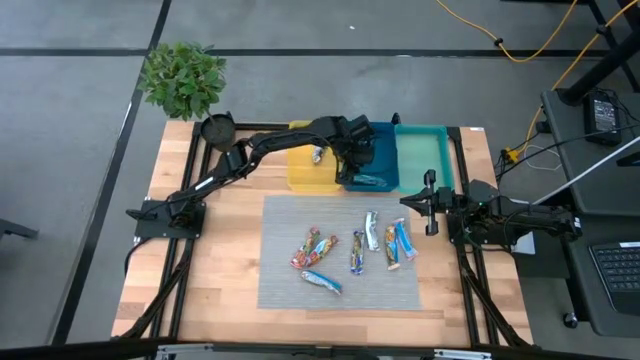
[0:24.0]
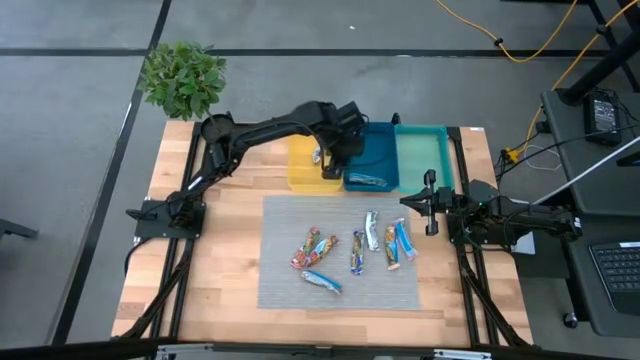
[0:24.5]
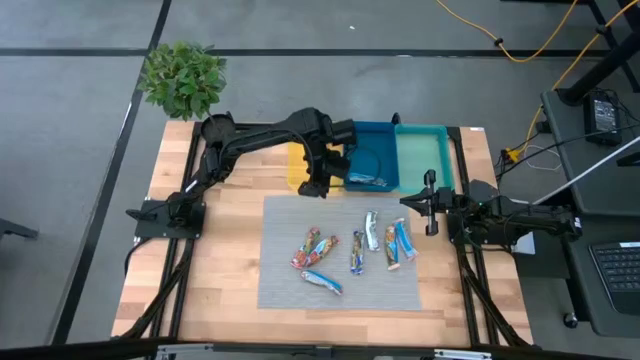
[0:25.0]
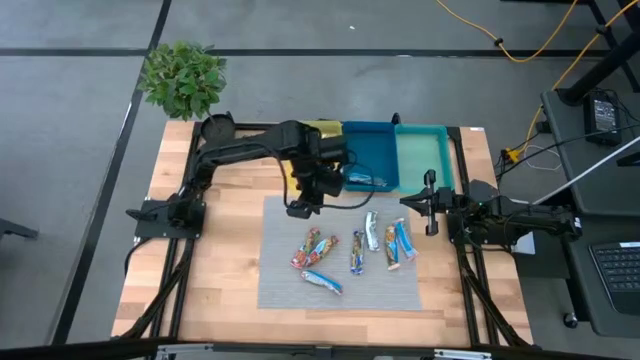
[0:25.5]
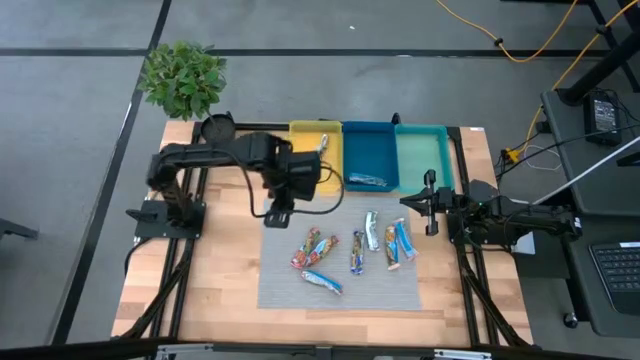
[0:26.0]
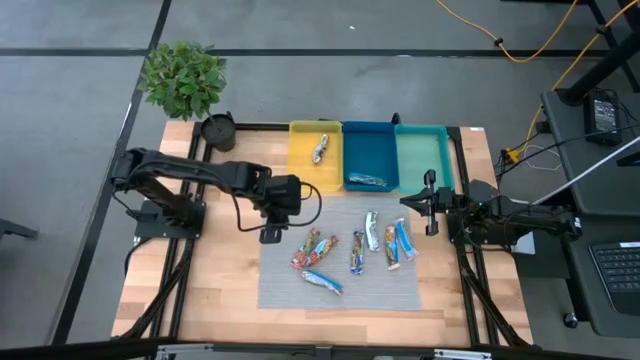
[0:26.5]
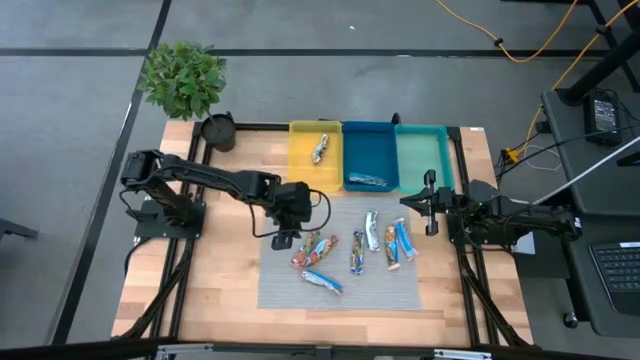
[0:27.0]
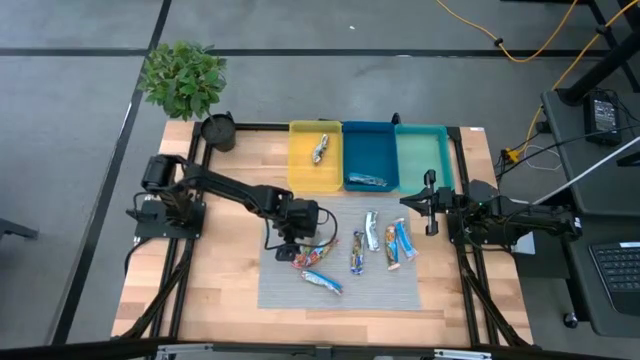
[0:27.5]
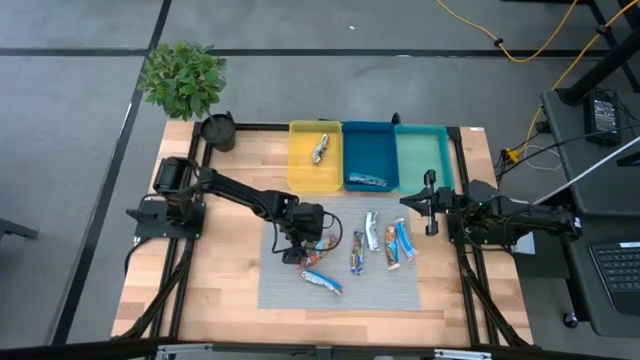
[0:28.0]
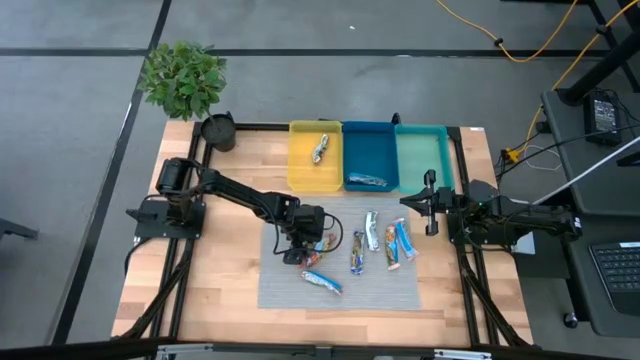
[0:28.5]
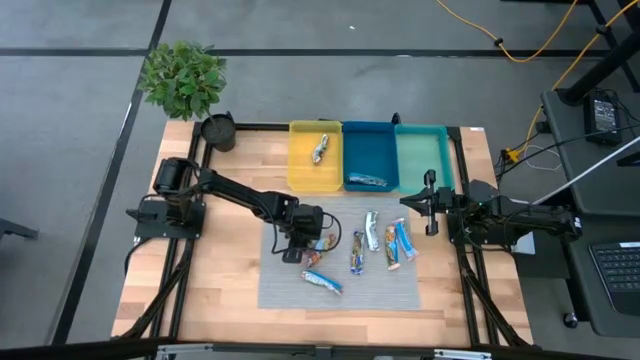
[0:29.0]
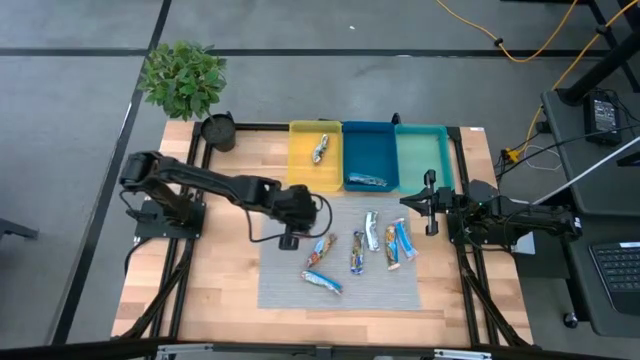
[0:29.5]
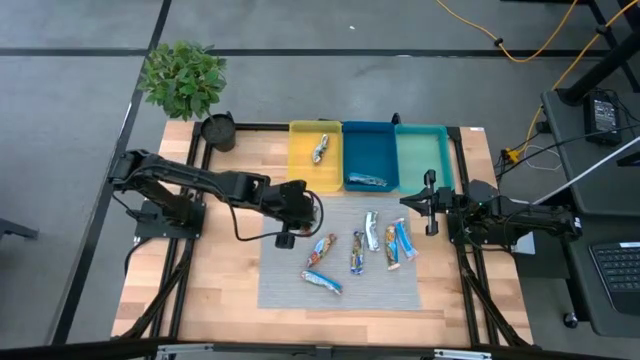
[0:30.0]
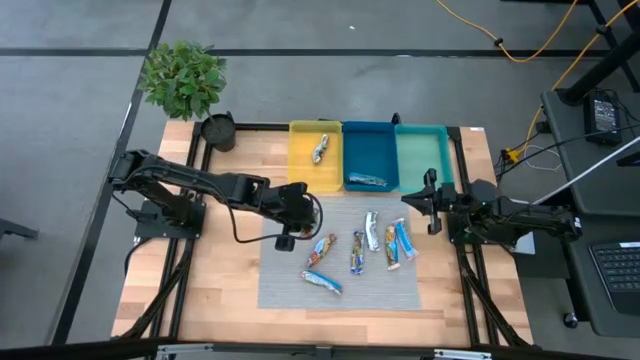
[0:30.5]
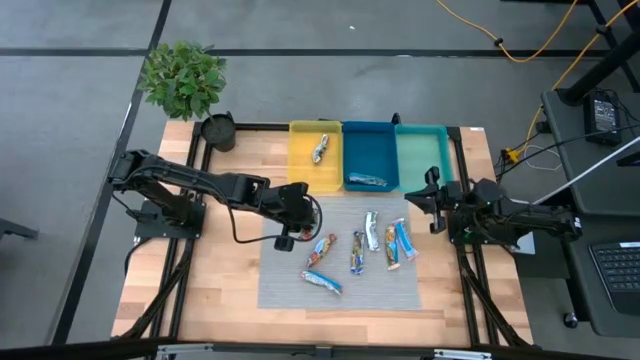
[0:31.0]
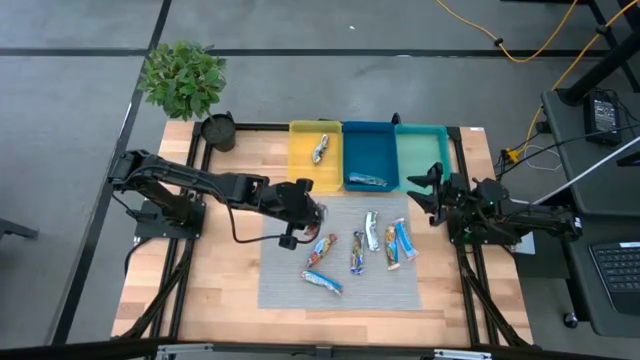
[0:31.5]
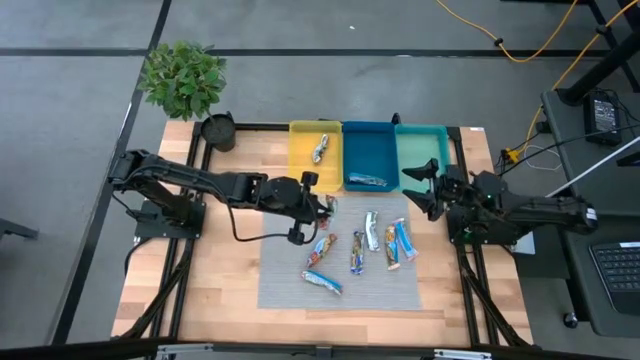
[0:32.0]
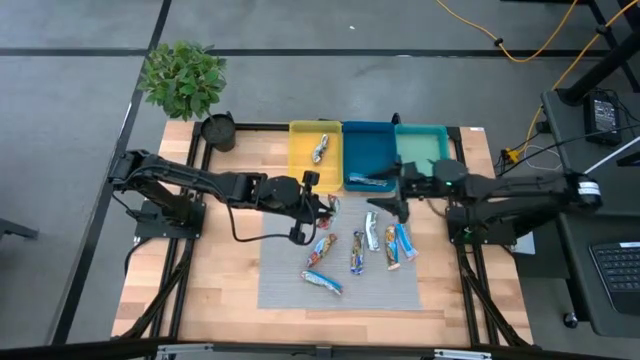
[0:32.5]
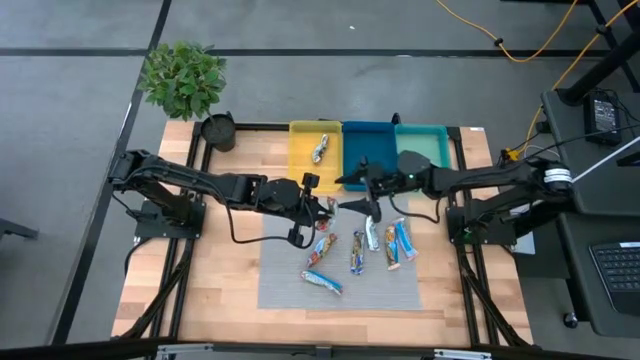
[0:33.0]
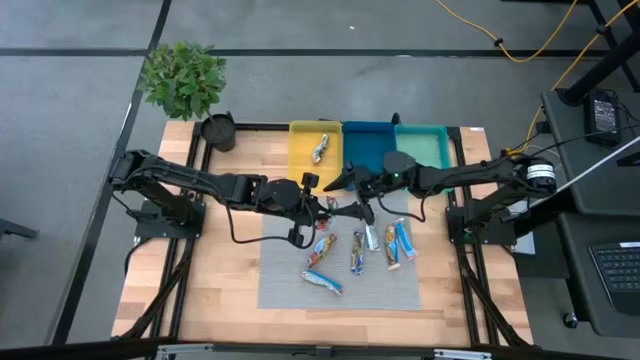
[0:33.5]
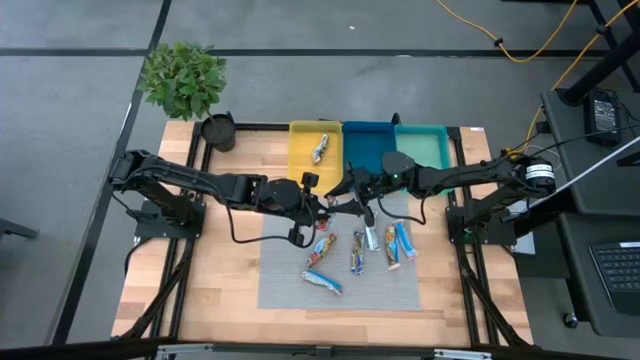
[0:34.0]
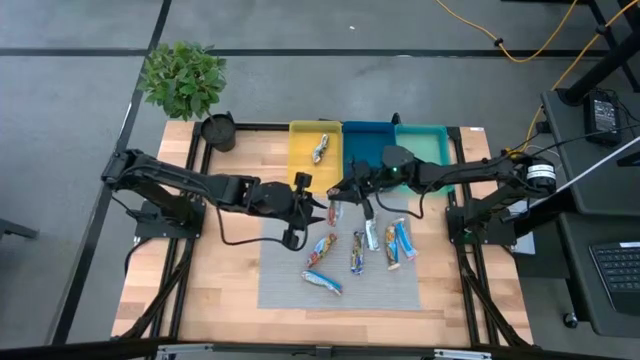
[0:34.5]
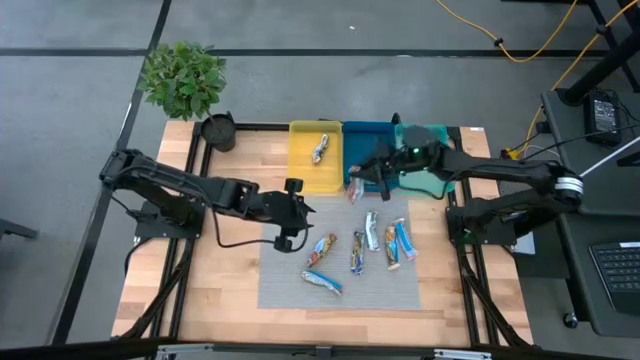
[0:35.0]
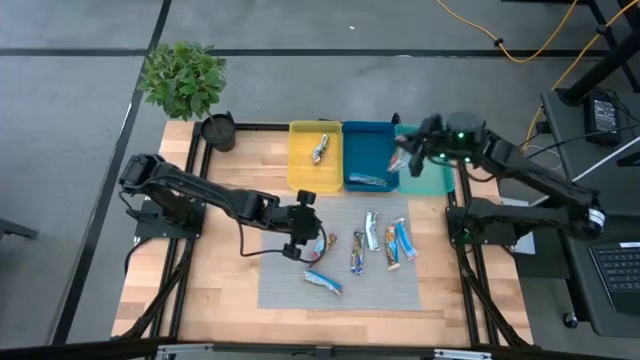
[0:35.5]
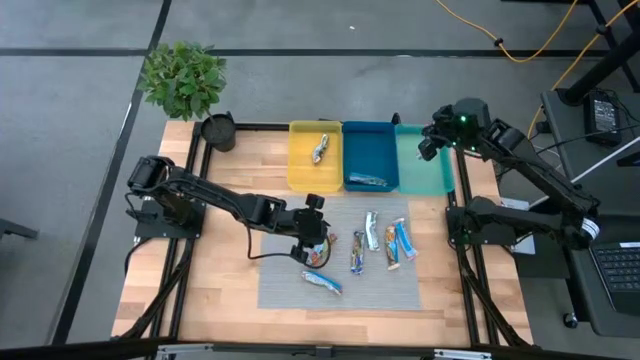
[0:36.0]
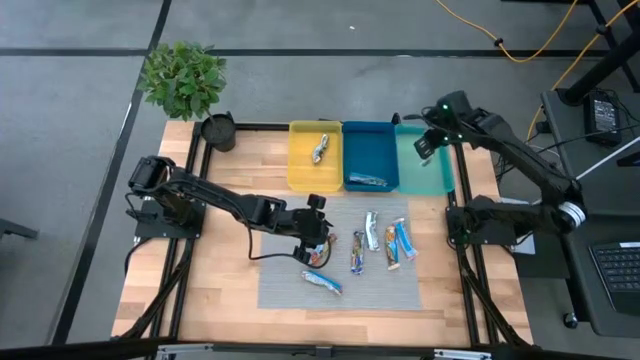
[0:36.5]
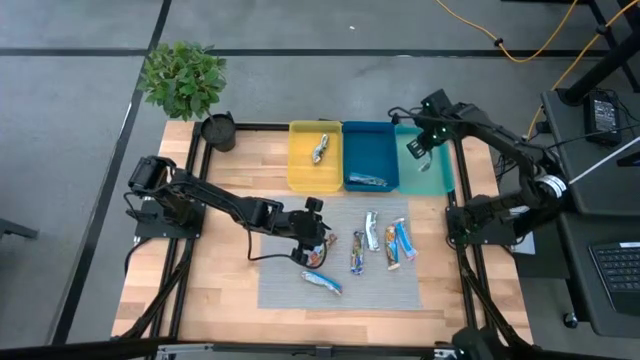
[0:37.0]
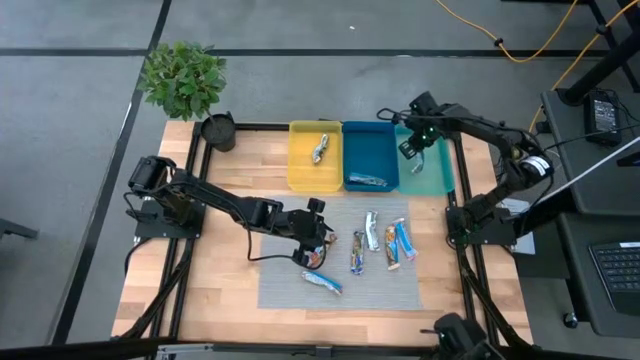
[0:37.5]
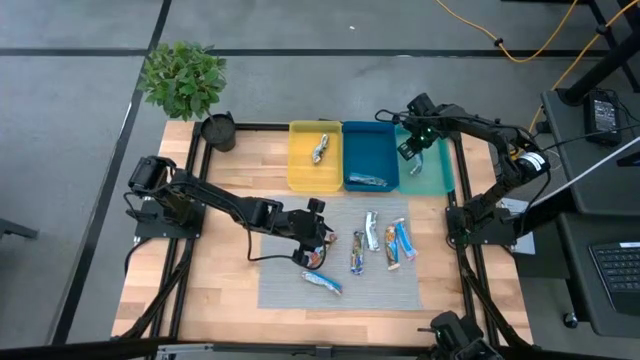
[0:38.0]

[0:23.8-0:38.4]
Task: Pick and place Granola Bars by type
Put the red granola bar into the light blue bin

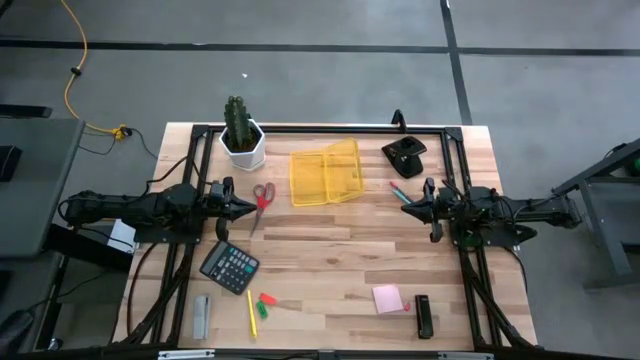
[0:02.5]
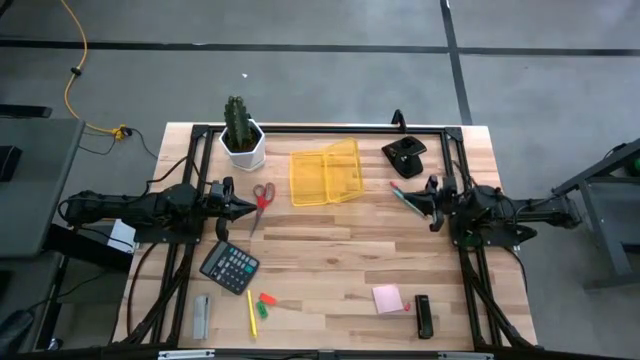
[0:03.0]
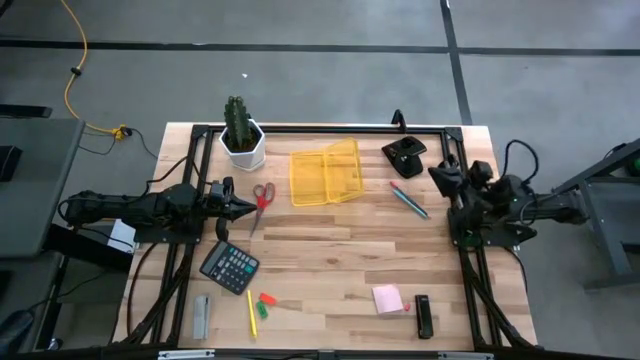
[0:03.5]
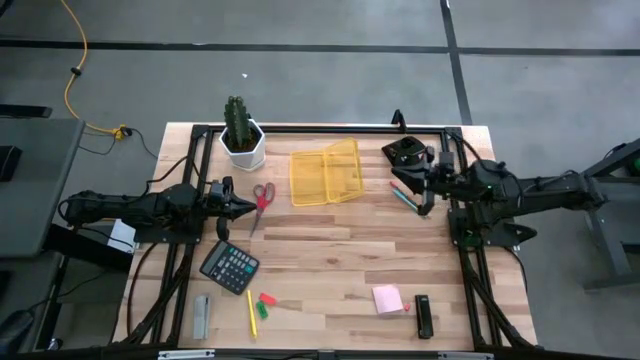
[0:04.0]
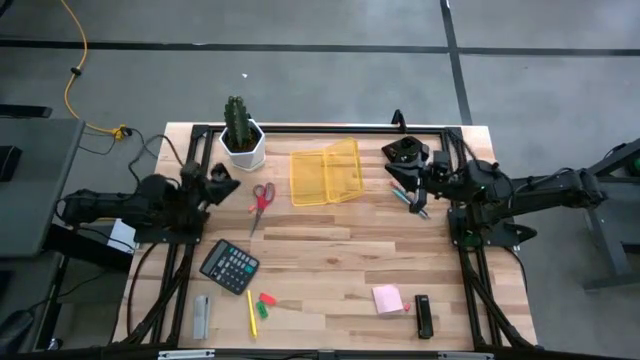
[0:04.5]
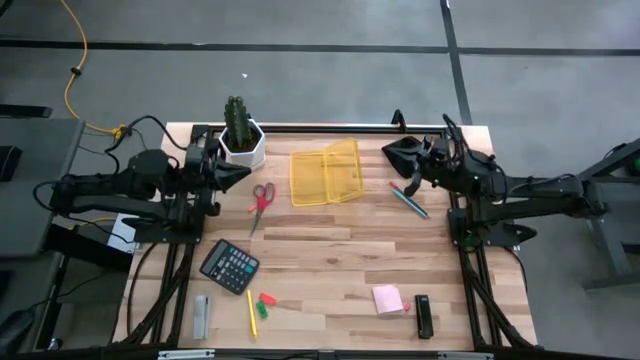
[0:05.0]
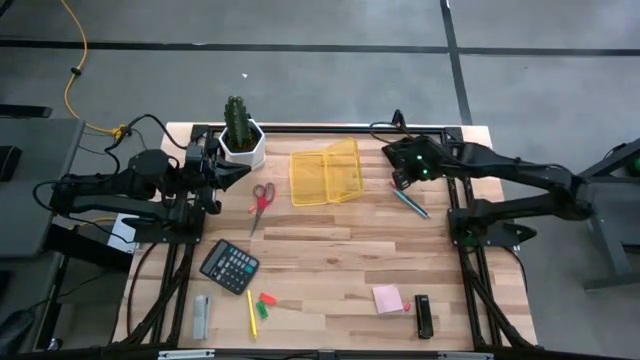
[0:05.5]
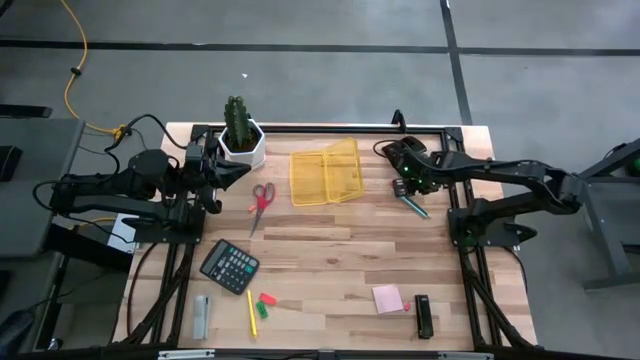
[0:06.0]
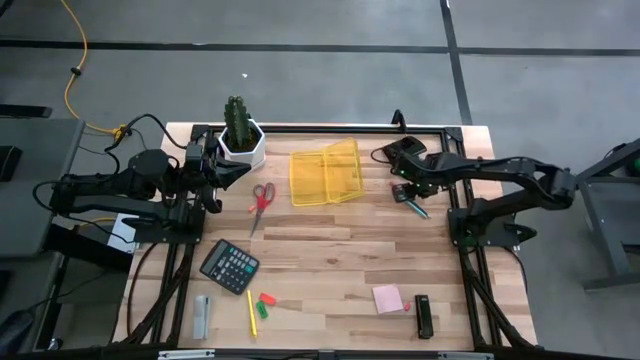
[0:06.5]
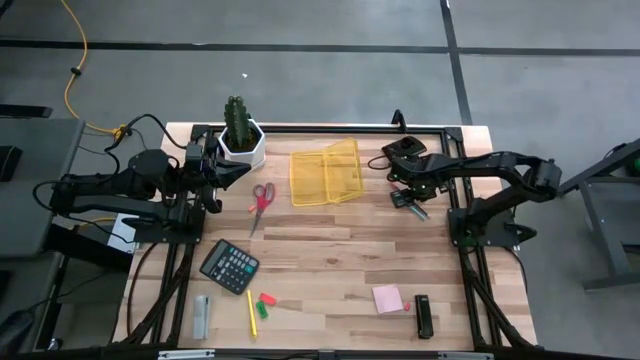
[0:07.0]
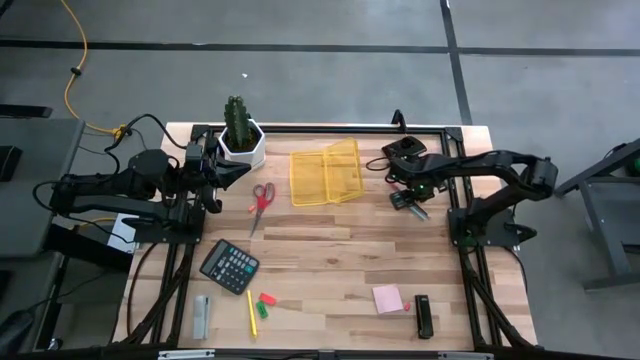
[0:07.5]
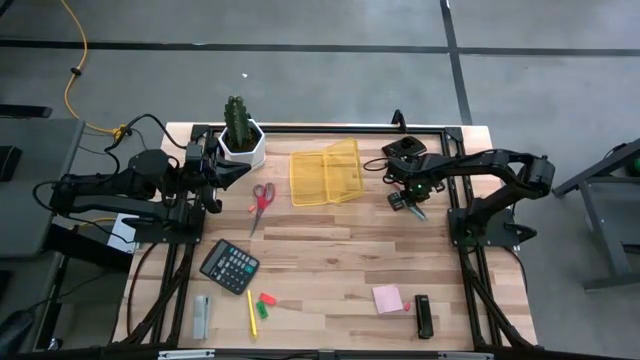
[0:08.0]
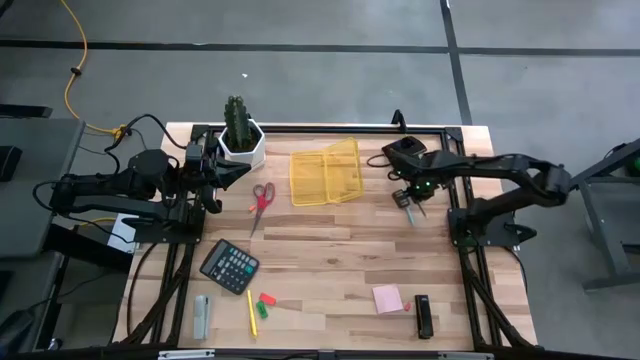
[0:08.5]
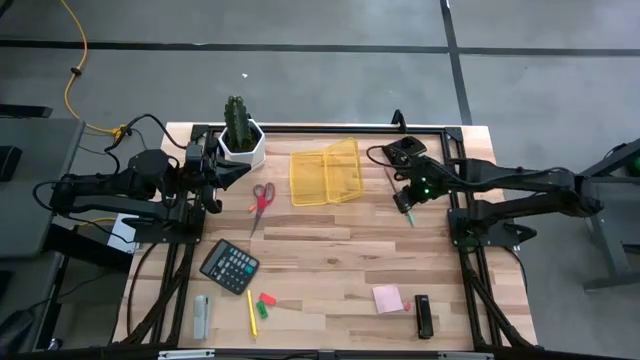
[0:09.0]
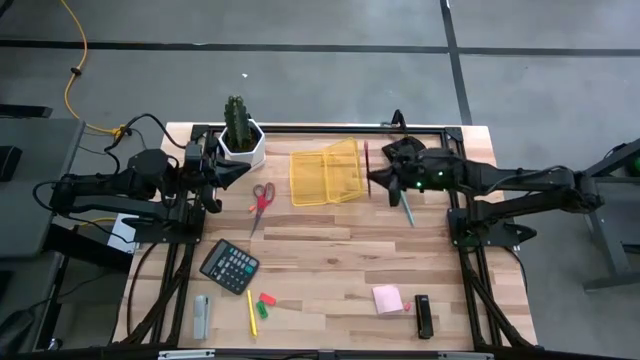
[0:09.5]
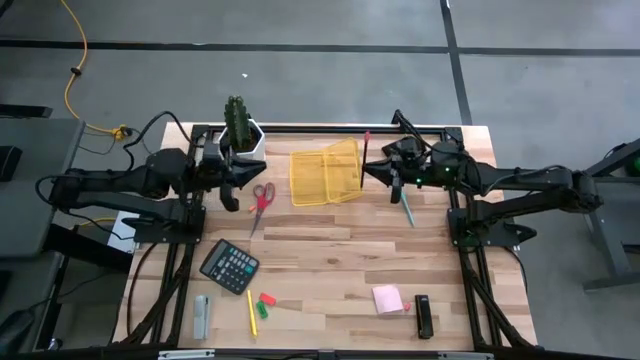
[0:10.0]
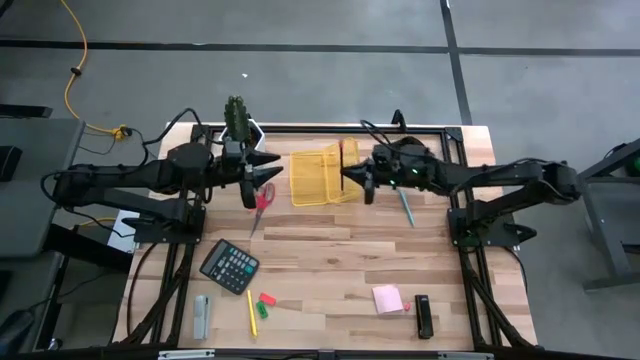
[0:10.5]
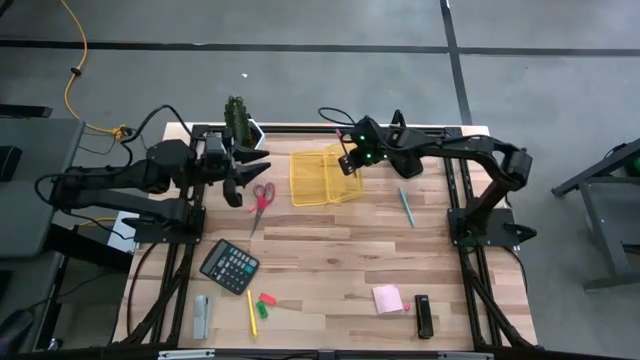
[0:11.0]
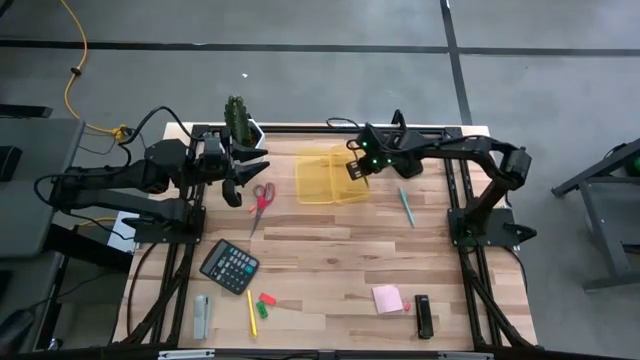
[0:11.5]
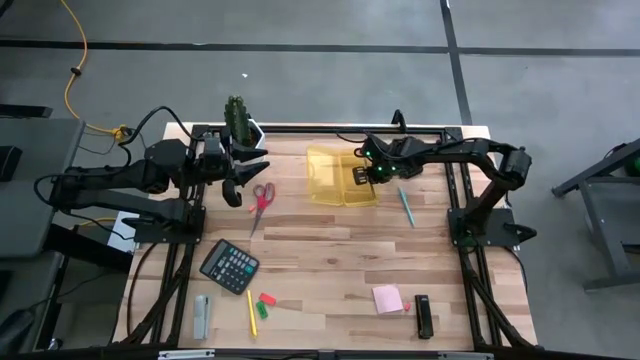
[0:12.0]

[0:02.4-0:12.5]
Task: Pack school essentials
Put the blue pencil into the yellow supply box
